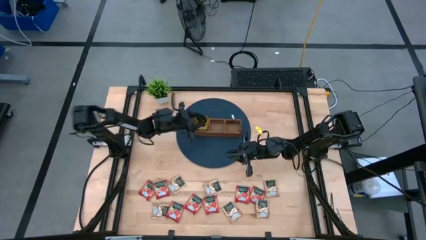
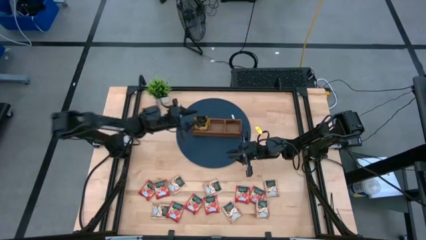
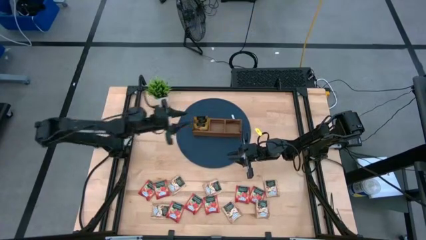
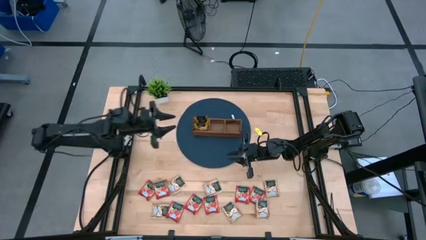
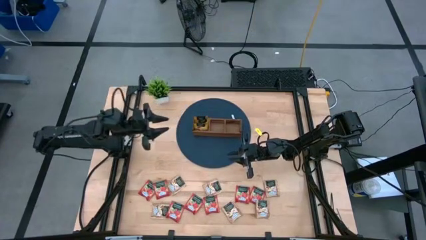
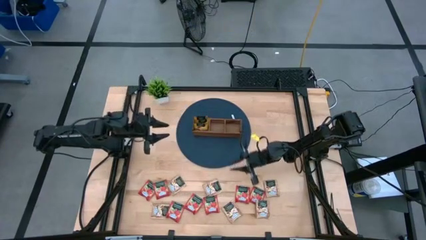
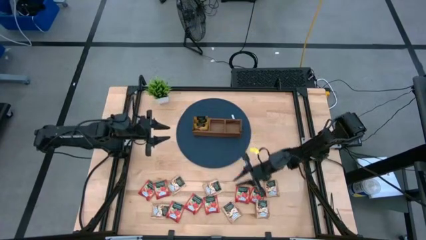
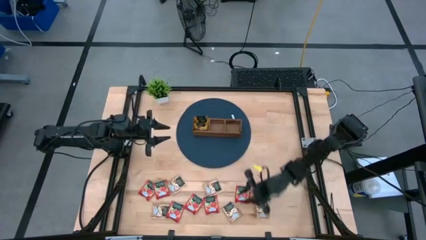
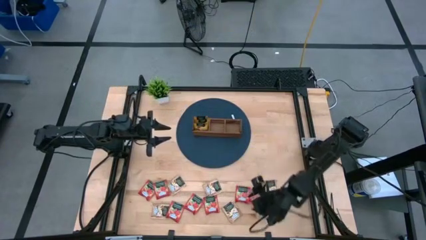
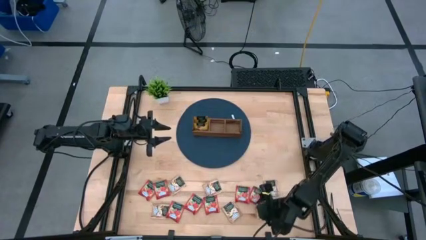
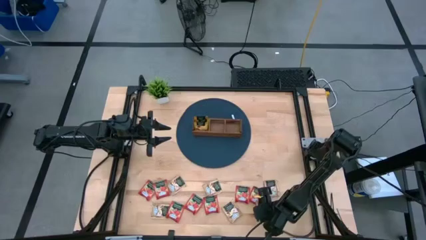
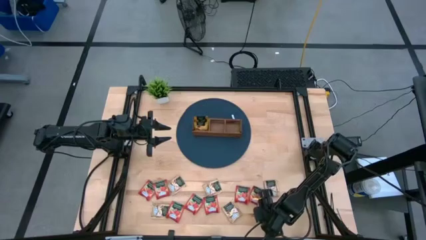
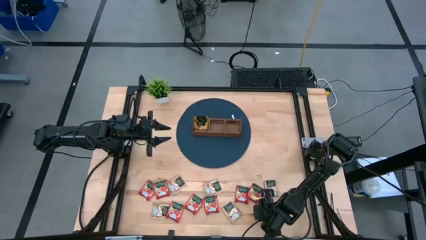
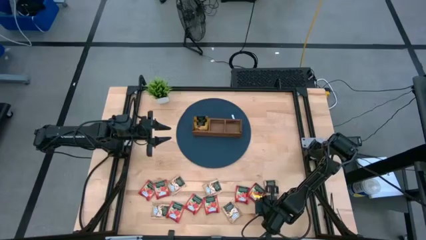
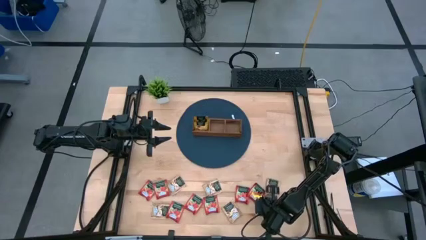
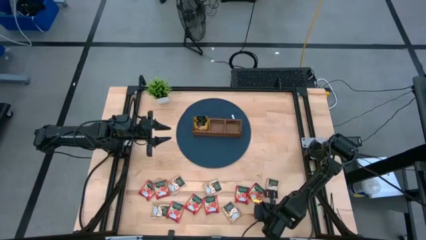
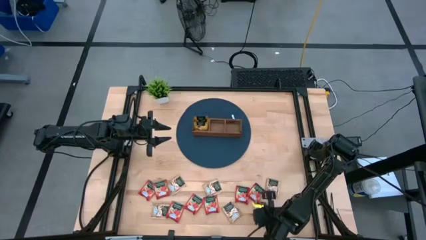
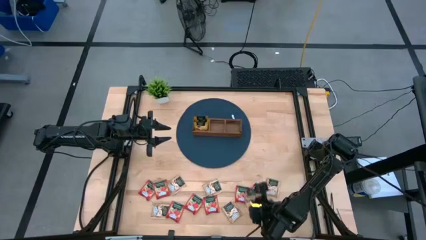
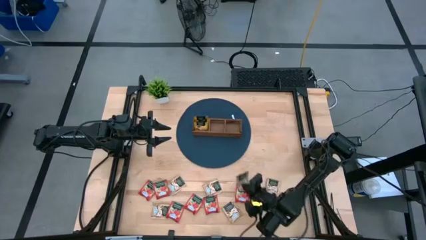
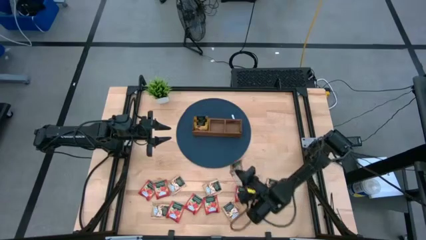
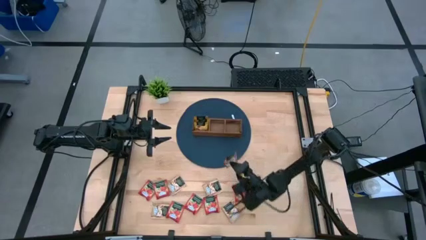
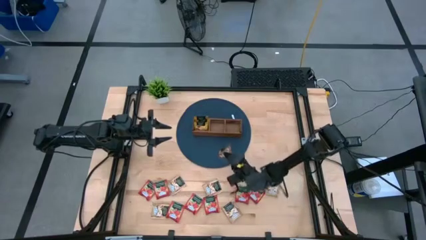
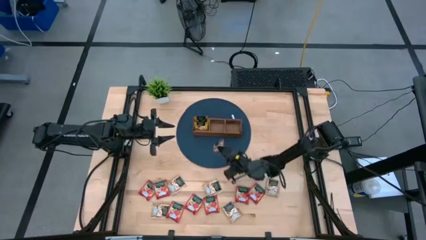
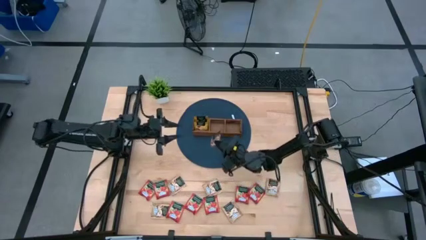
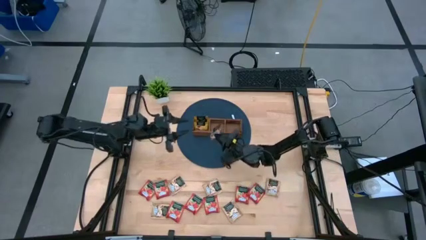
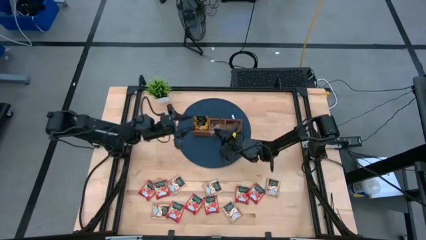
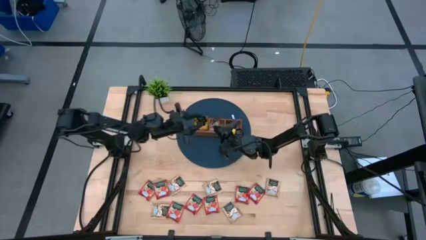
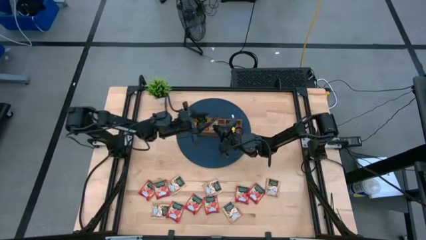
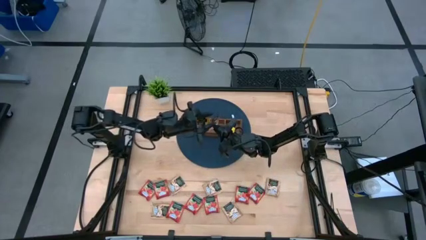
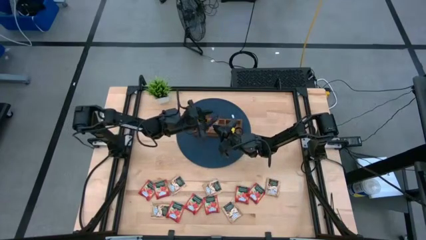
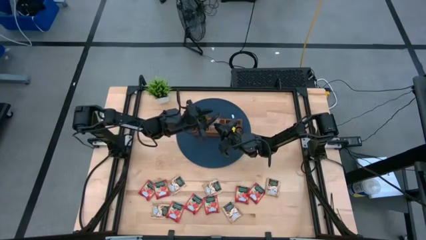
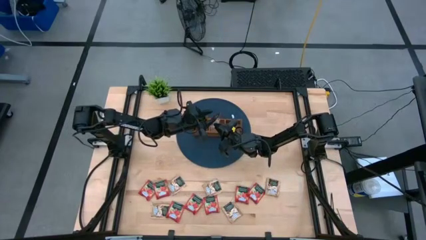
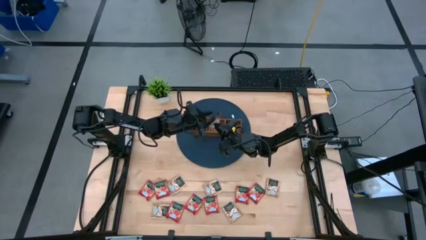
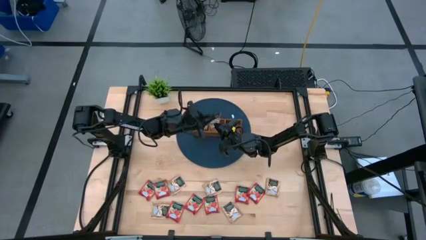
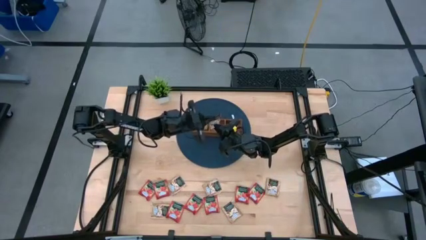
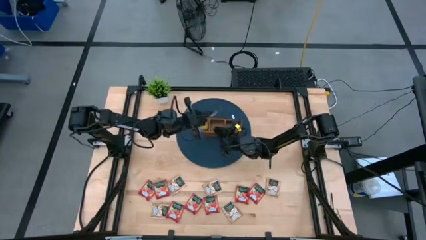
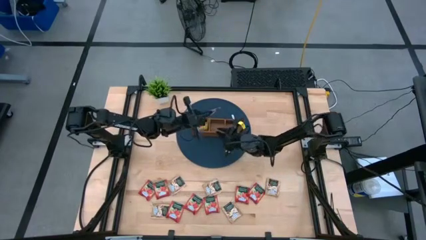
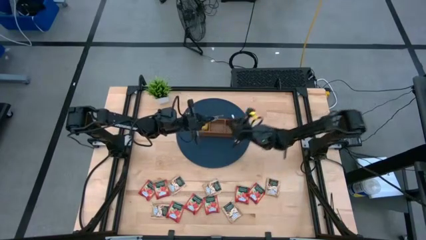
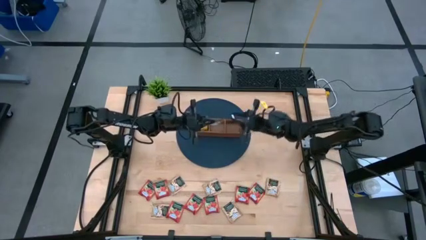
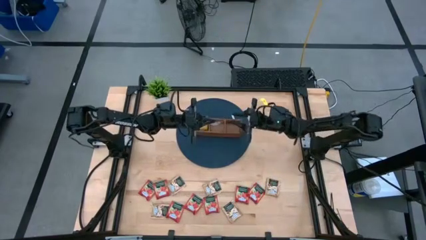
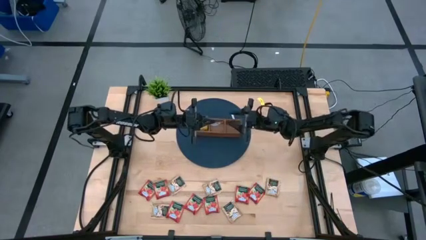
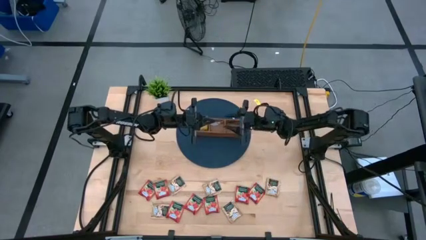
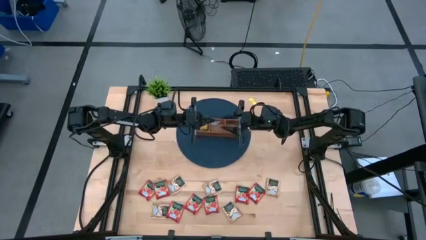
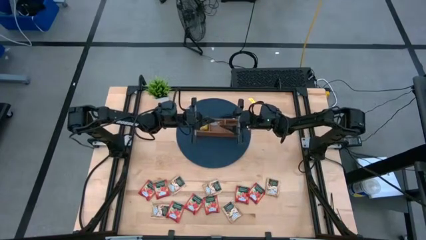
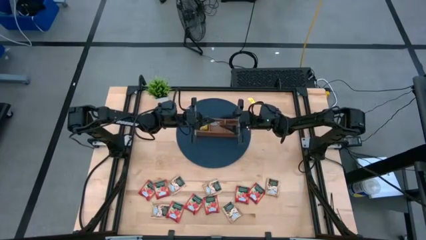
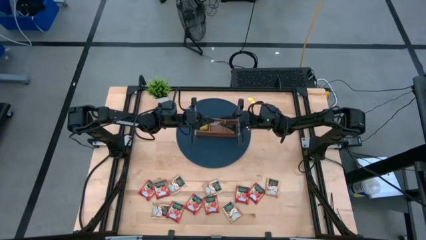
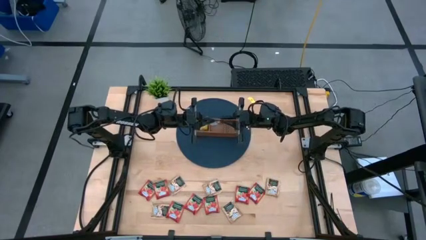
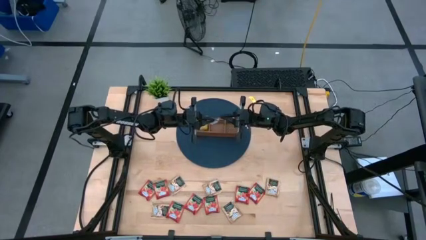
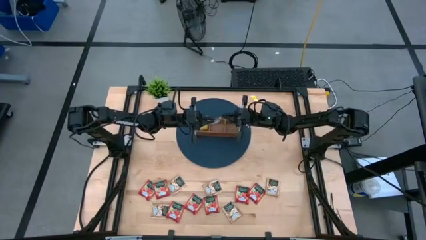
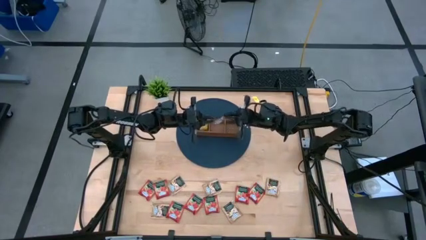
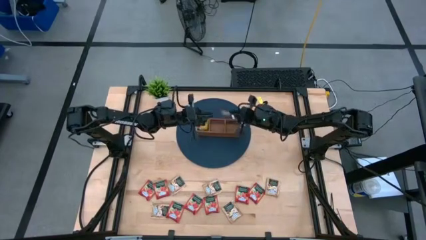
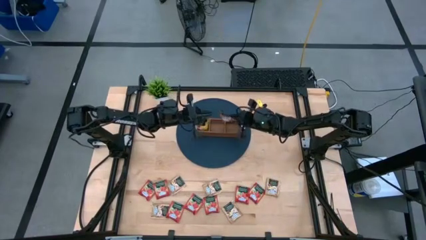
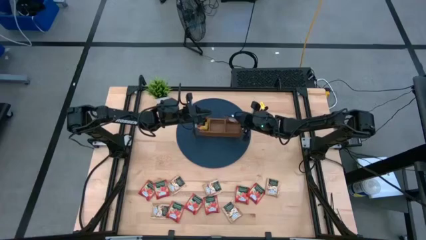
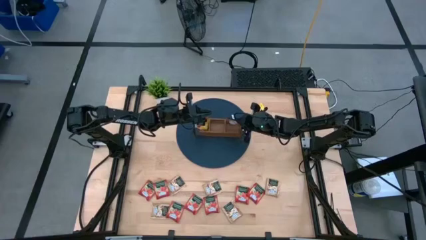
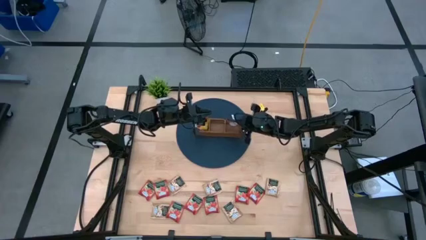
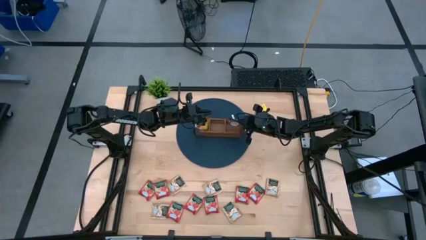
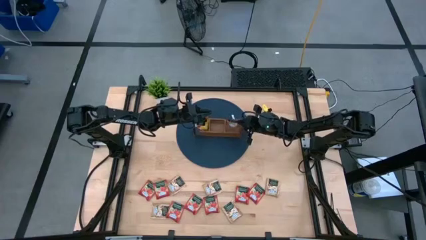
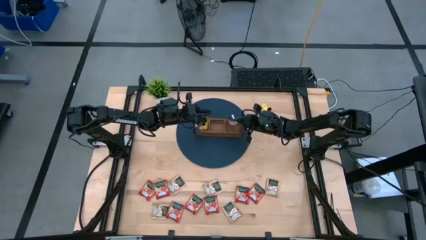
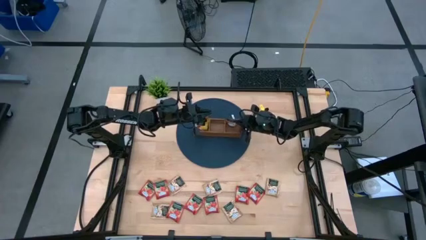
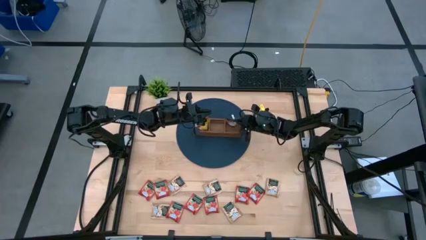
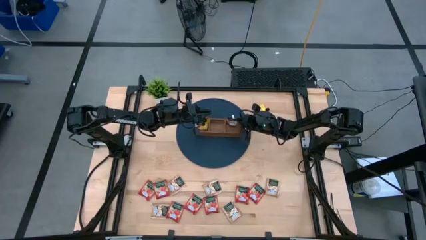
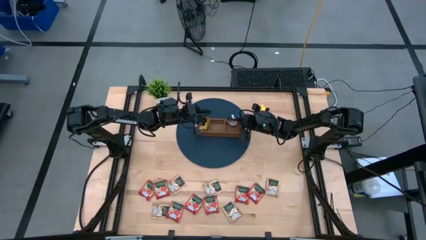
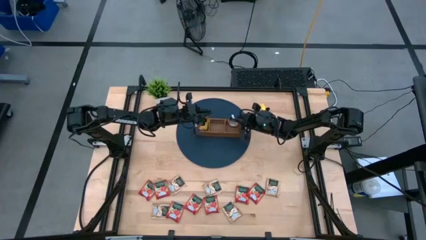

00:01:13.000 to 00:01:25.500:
Task: Pick & Place Tea
Put the brown tea bag into the right section of the wooden organizer

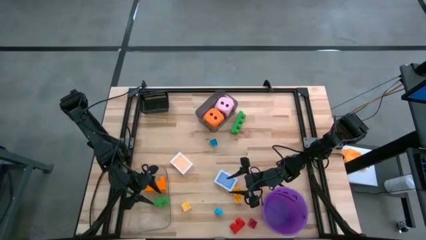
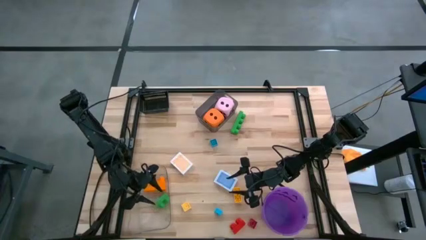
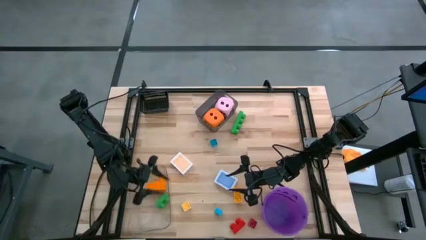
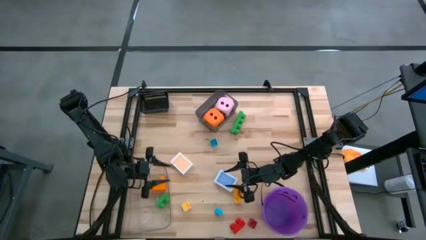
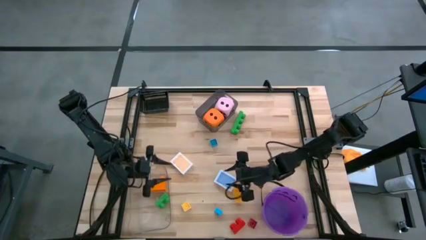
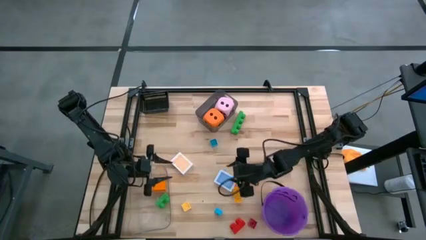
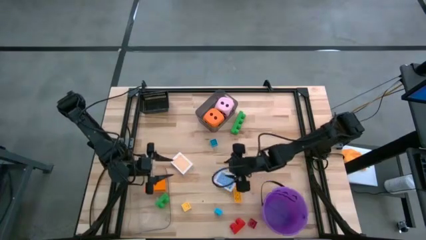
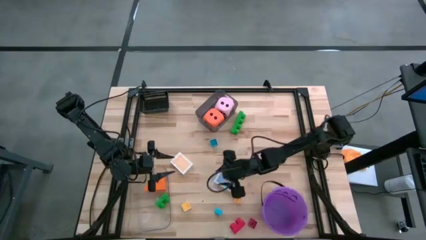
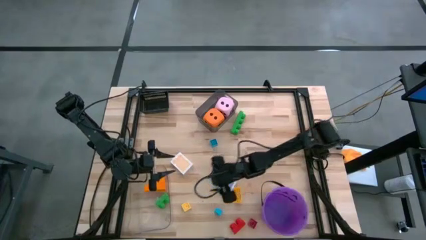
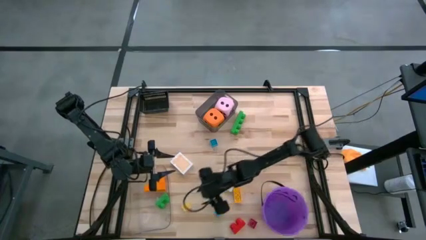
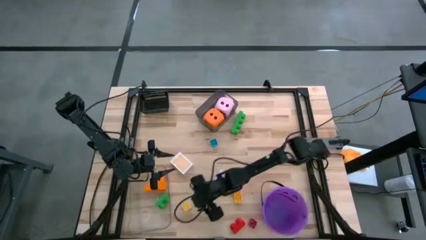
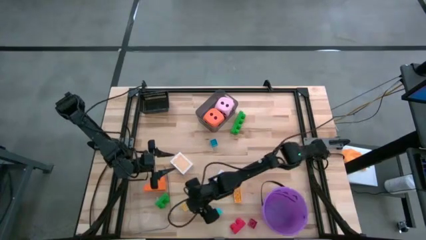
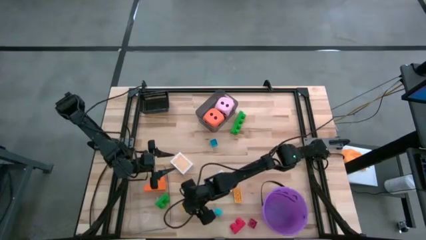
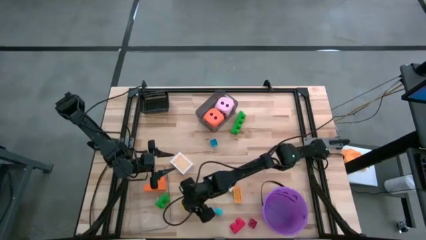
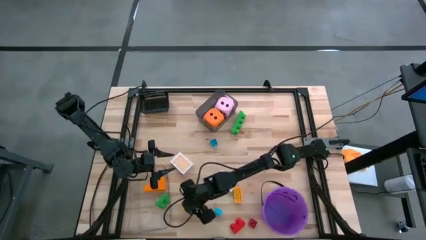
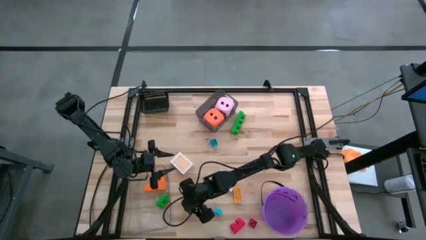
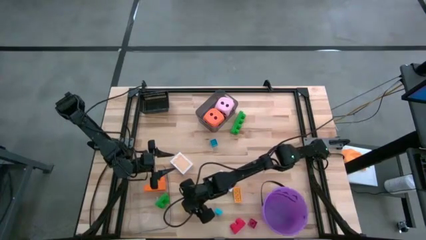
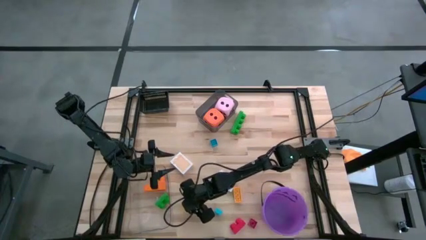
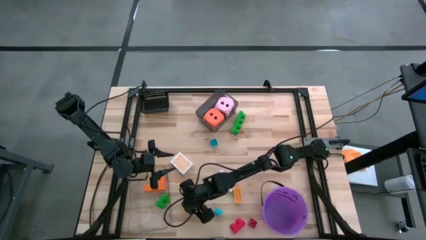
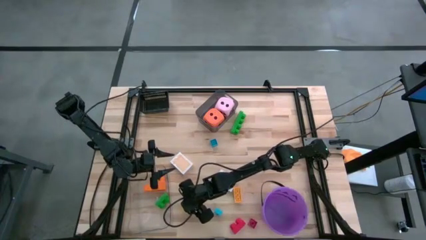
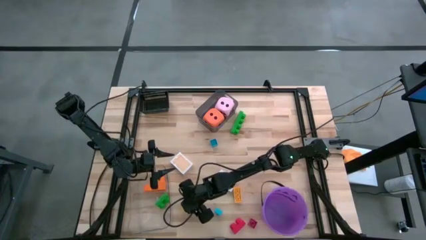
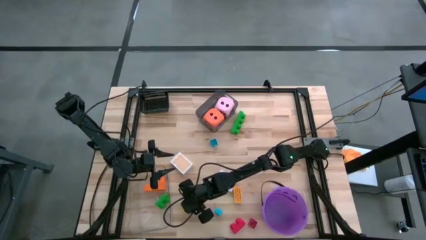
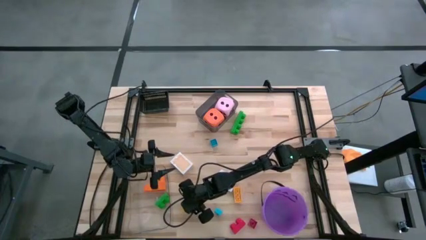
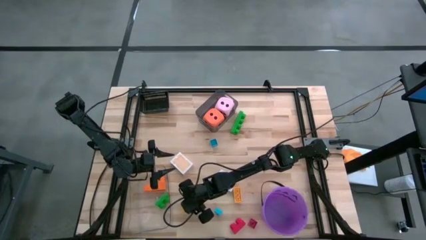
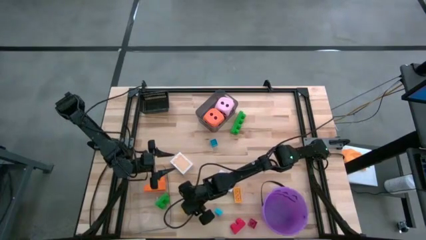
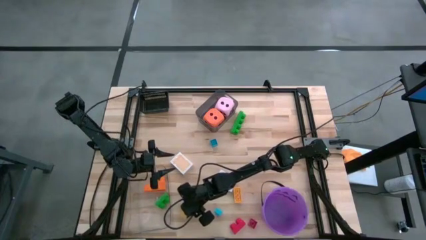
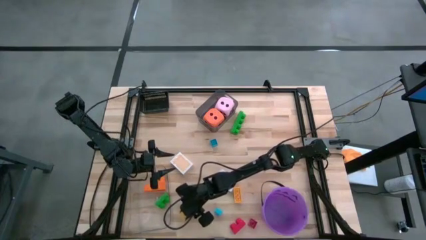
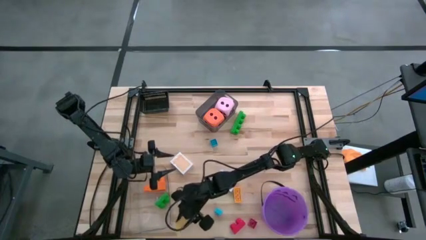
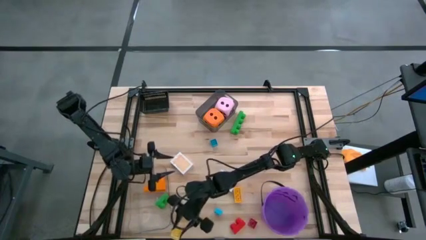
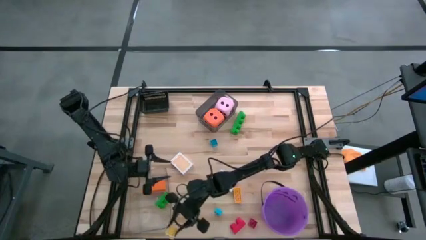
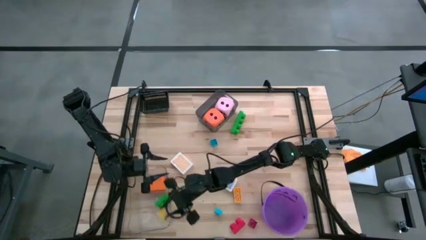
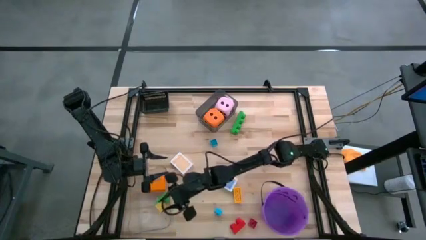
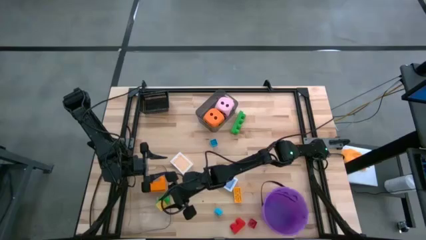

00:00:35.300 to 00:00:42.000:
Task: Pick & Place Toys
Put the yellow game piece into the transparent bin
